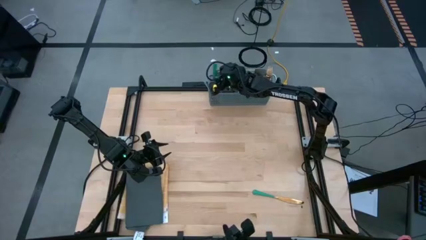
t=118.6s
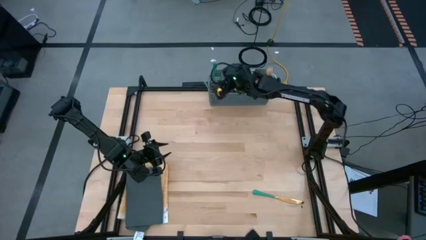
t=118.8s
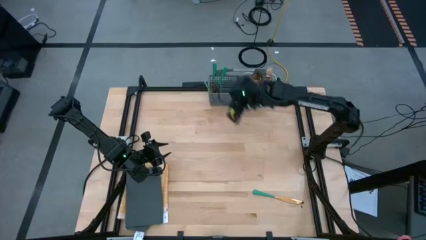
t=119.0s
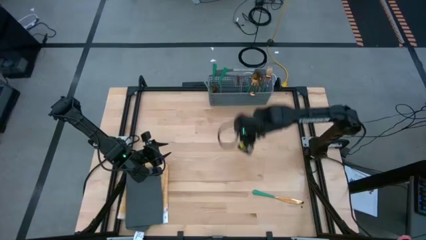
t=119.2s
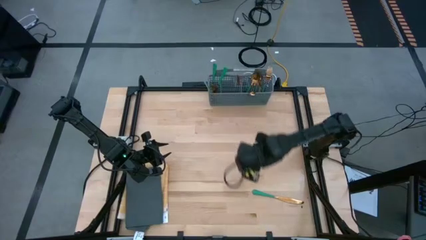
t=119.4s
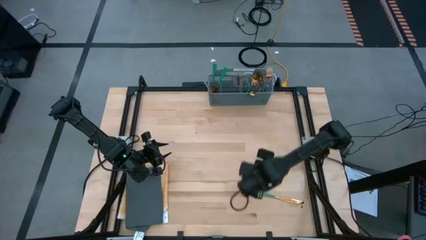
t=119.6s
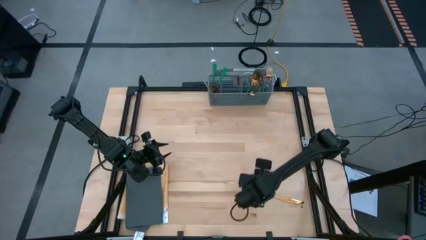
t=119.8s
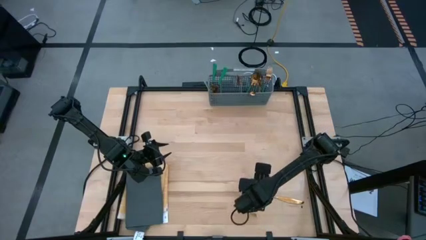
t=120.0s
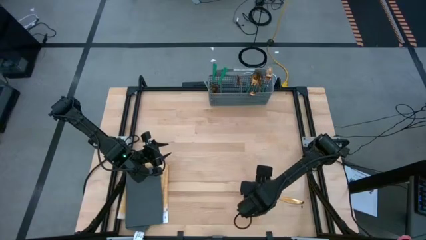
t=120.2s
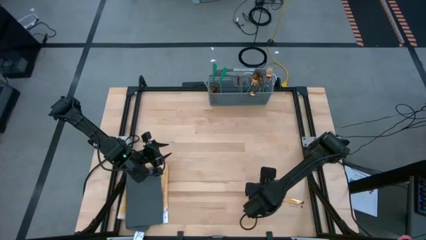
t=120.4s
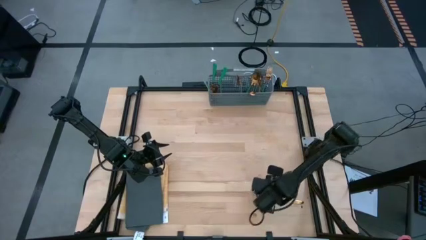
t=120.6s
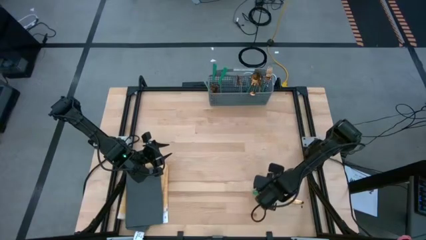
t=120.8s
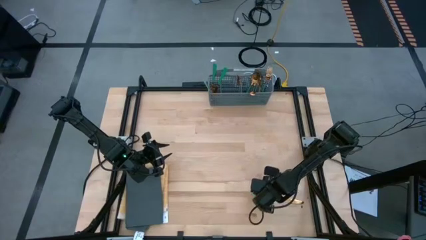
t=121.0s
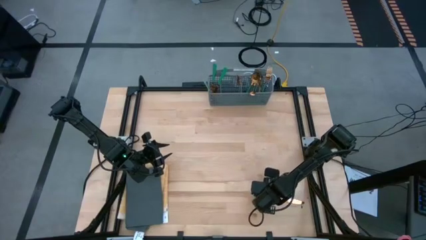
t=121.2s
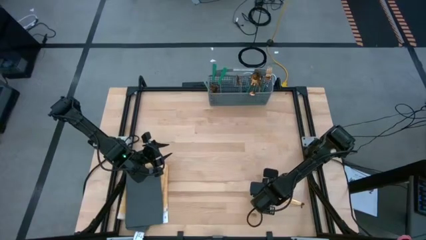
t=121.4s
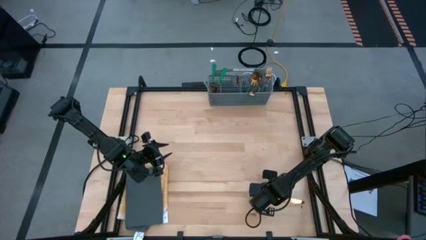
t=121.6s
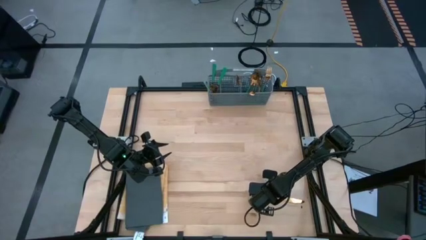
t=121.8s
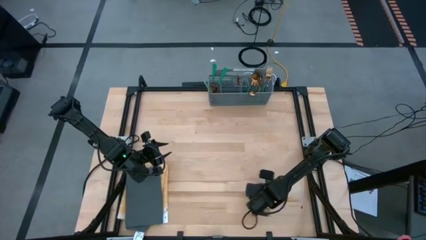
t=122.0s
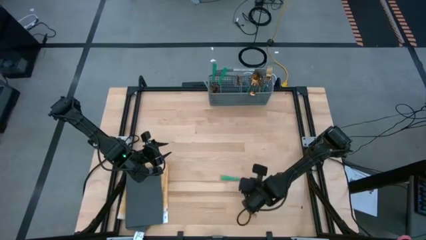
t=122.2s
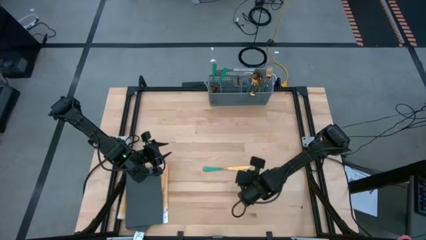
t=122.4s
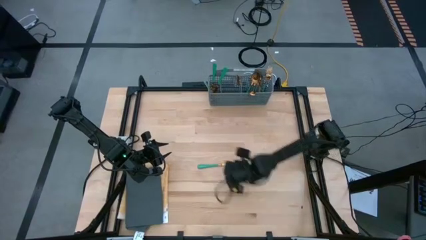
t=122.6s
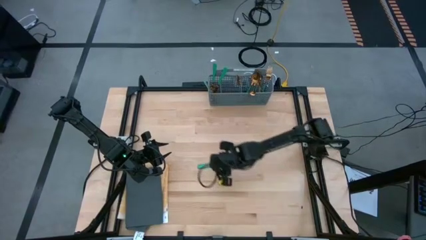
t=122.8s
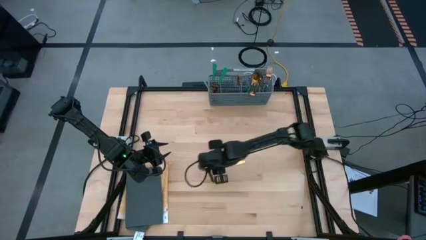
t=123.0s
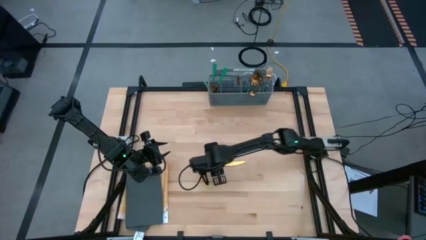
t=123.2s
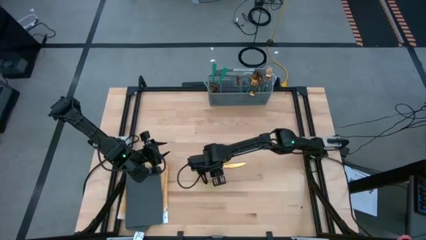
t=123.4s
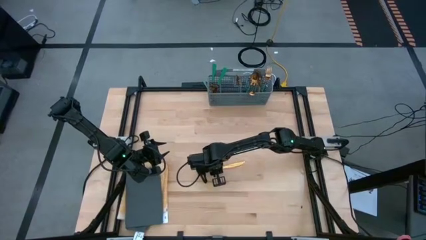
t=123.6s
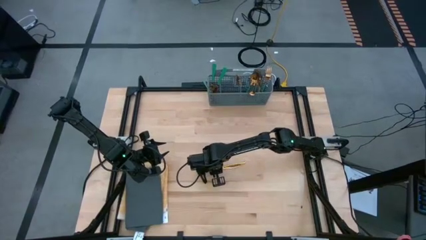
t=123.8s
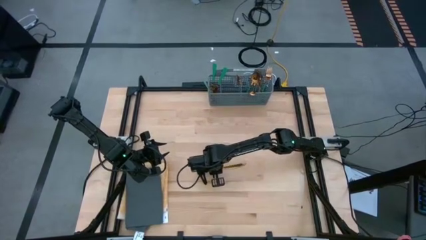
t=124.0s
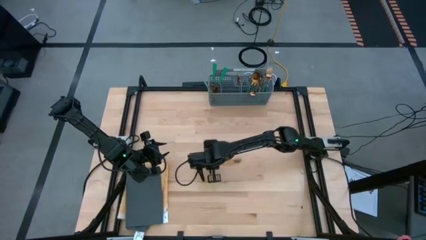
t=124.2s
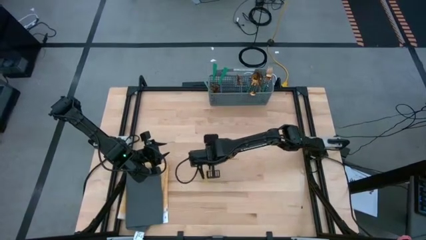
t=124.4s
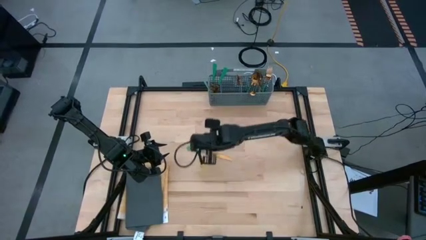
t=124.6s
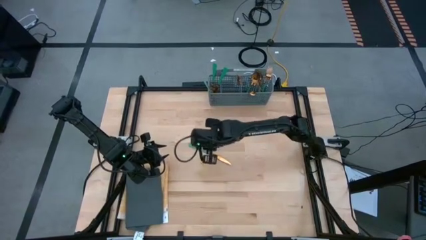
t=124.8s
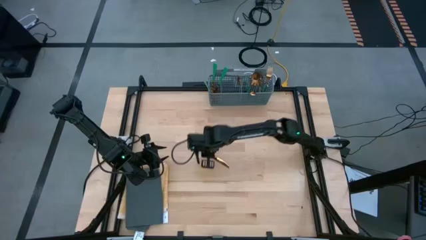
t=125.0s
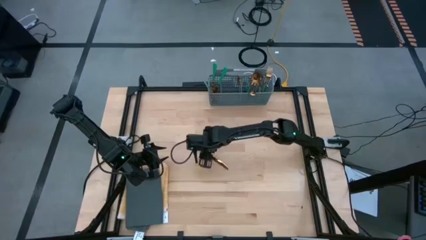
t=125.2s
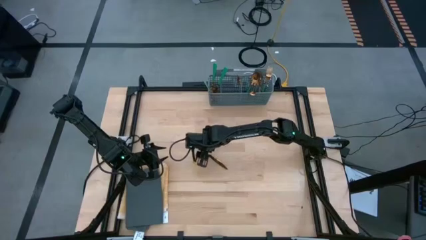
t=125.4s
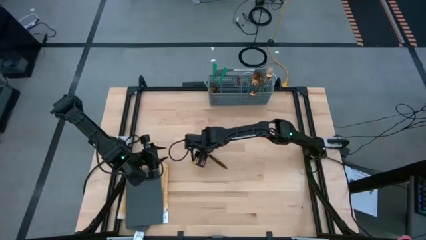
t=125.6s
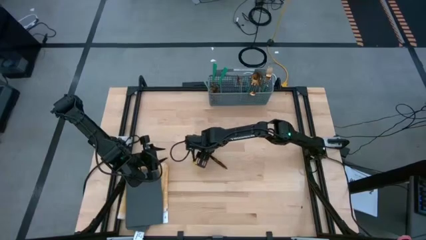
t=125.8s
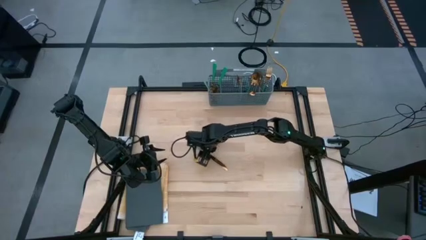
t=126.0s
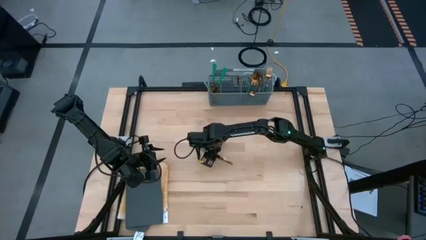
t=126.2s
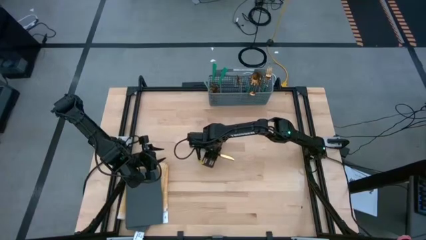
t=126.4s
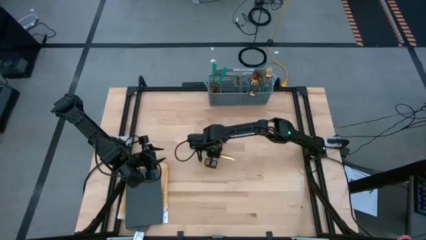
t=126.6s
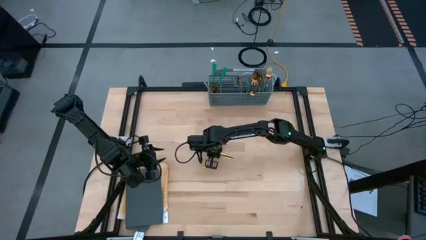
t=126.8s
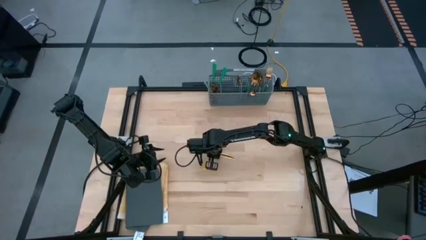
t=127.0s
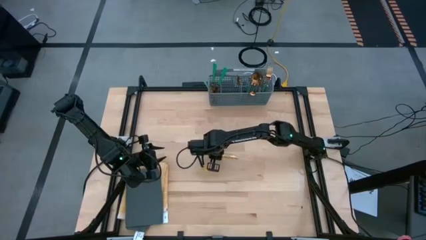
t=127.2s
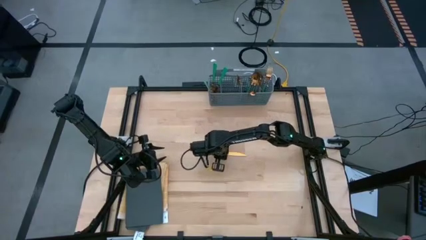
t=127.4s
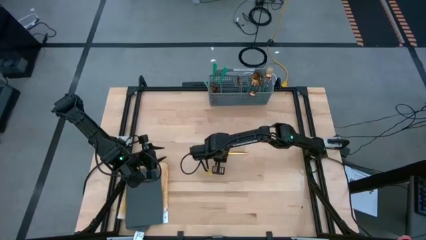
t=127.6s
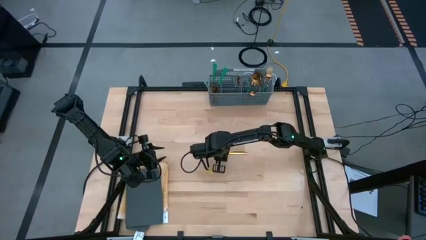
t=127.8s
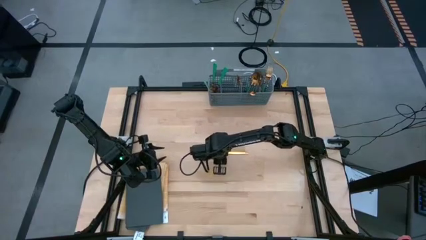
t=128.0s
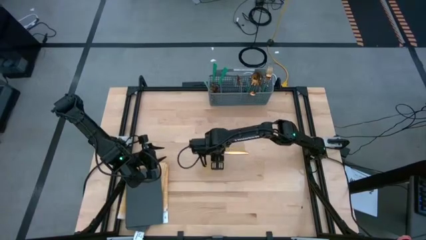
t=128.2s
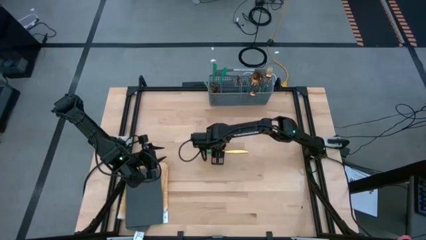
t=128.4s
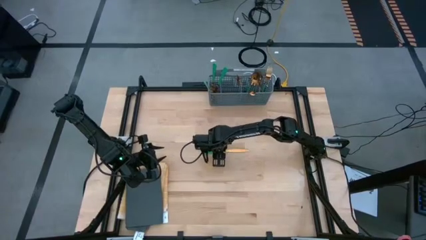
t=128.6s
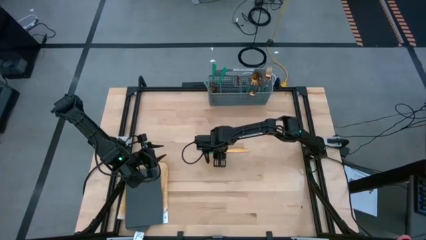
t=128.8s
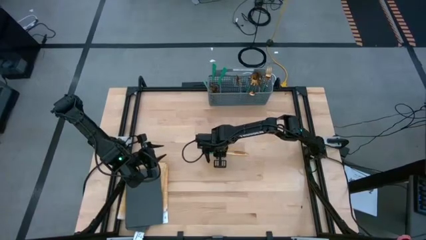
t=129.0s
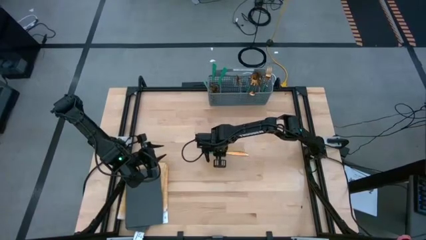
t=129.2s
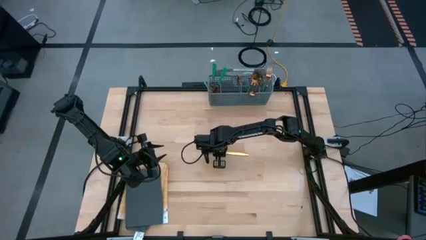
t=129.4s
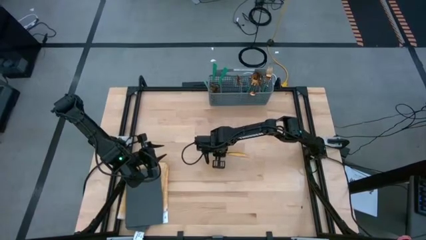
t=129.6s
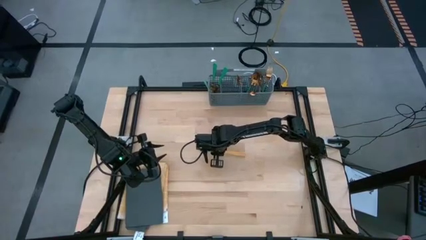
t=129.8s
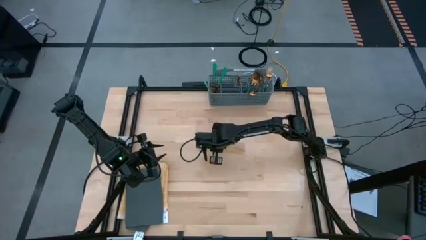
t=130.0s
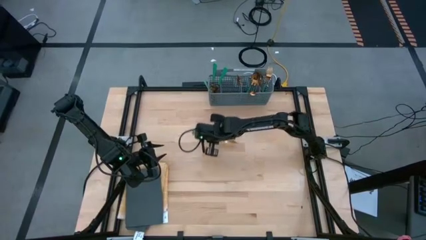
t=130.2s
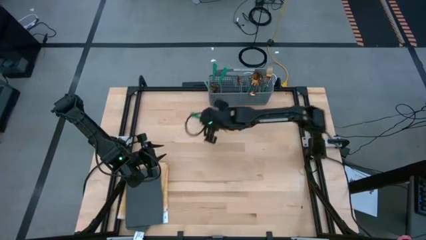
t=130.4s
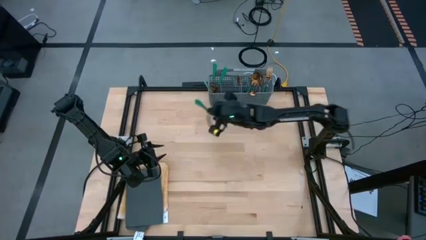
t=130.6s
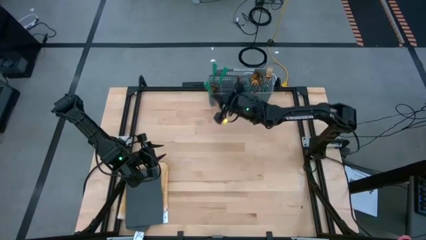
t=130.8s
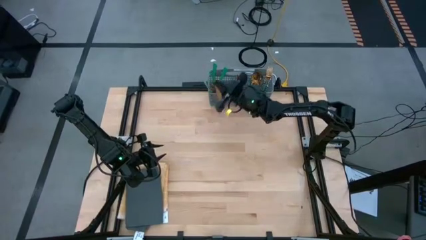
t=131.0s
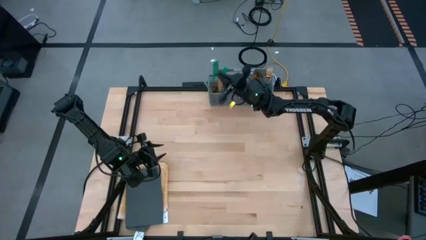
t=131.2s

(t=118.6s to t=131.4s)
Task: Sort silverware
Put the green knife into the gray silverware holder

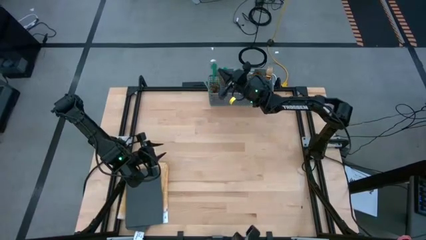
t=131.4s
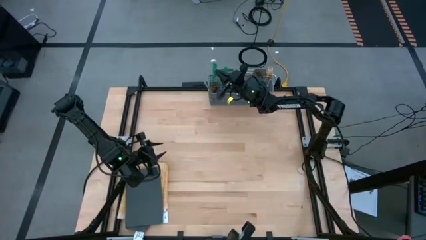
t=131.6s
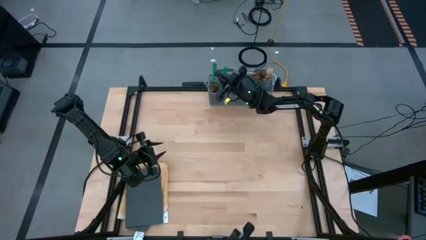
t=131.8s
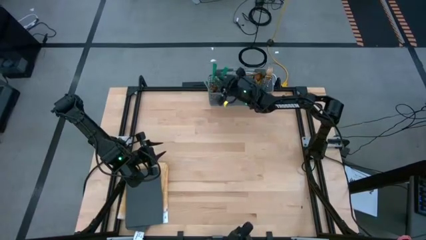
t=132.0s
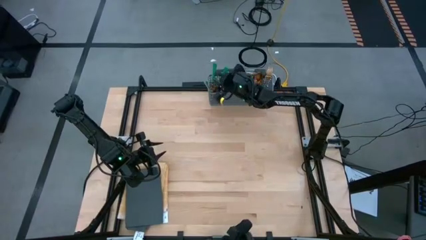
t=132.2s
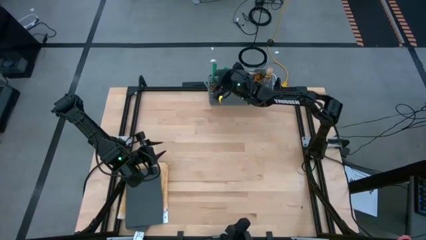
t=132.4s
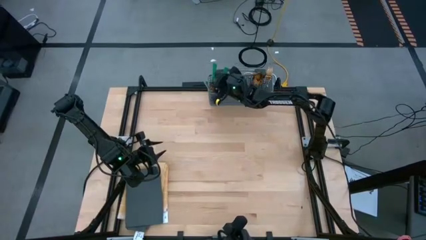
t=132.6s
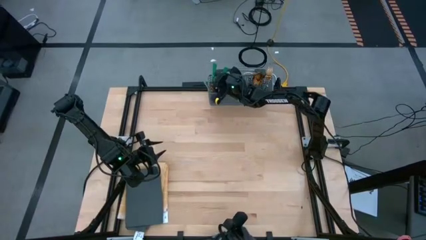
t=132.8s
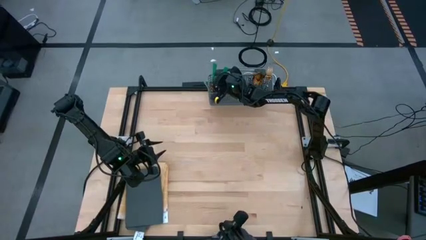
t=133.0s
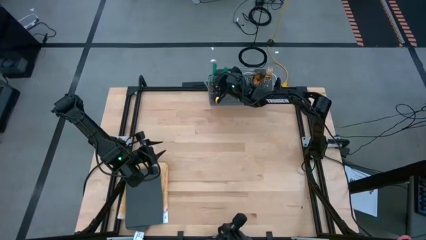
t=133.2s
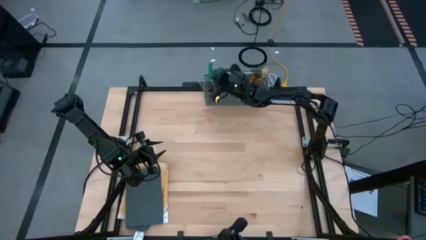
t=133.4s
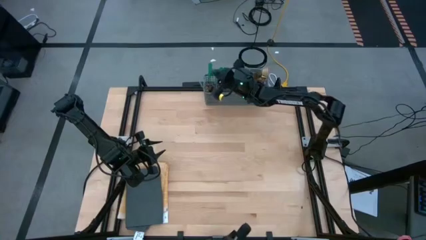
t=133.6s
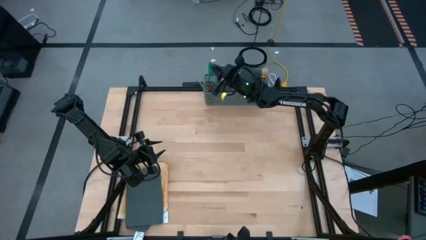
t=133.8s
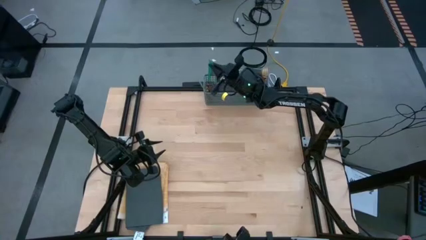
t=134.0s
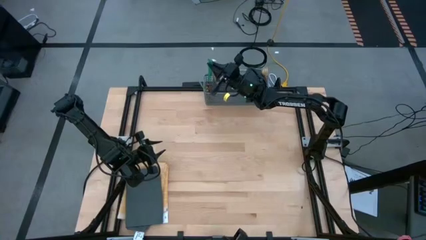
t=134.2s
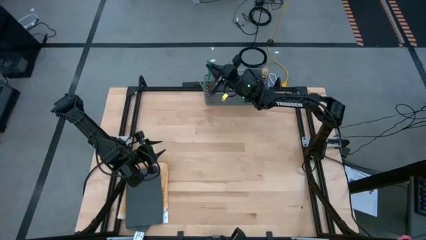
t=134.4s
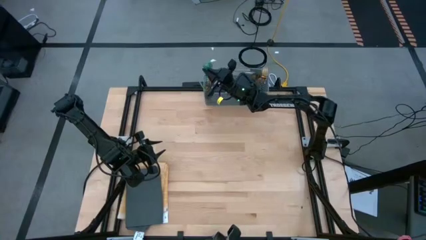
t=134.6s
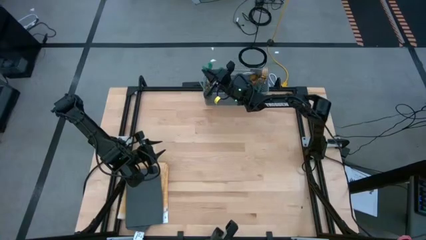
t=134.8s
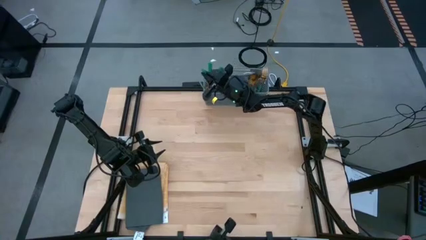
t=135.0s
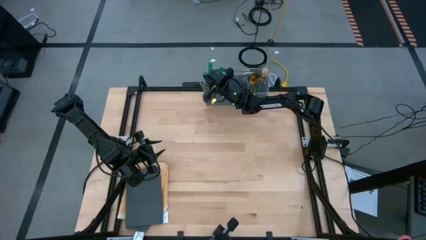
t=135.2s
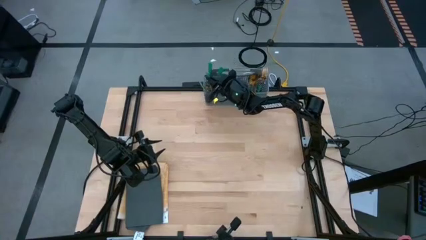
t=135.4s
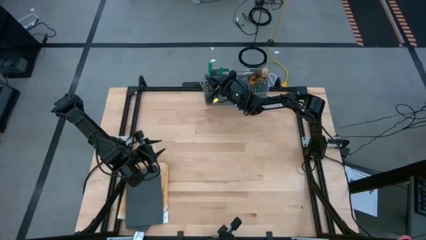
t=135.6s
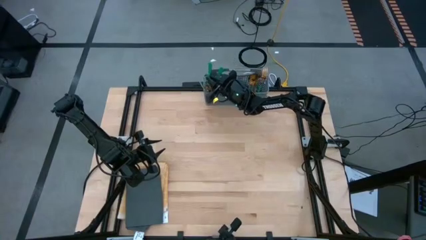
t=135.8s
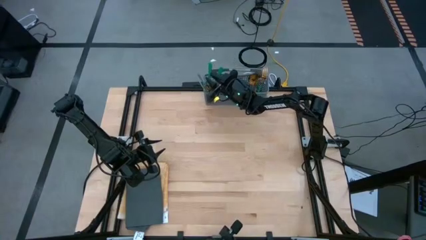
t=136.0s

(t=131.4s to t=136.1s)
Put the green knife into the gray silverware holder
